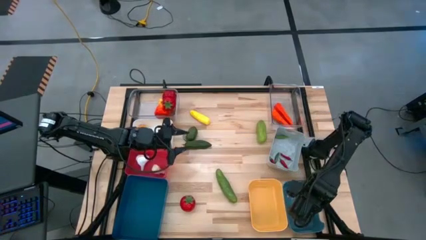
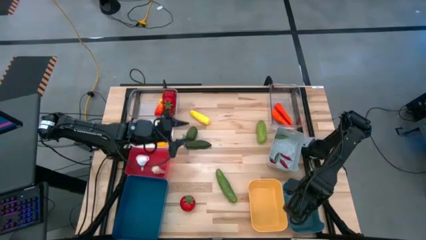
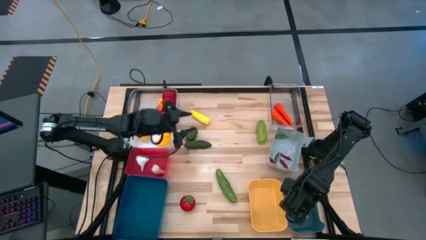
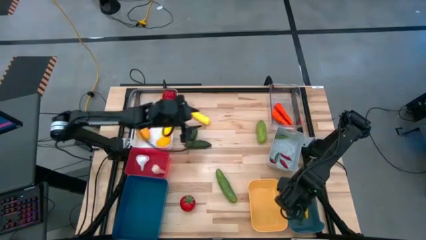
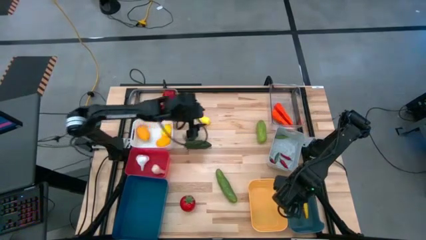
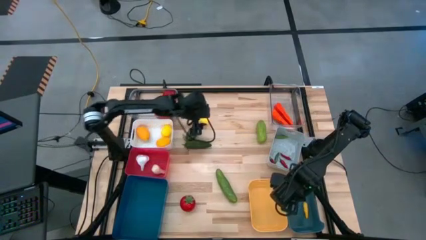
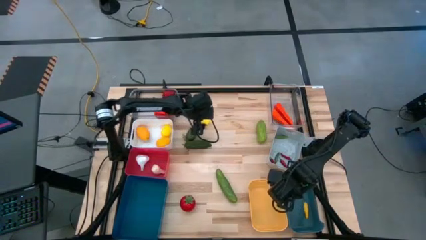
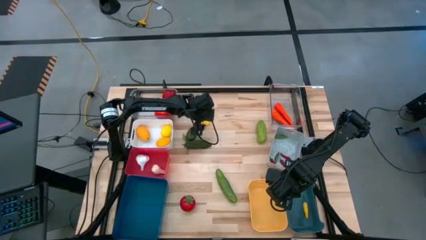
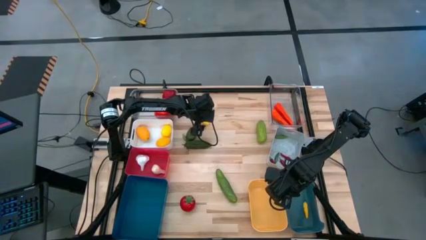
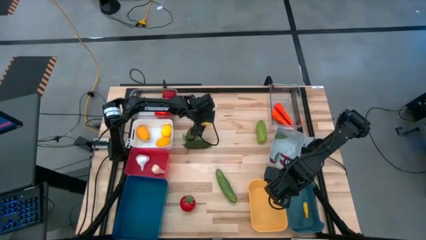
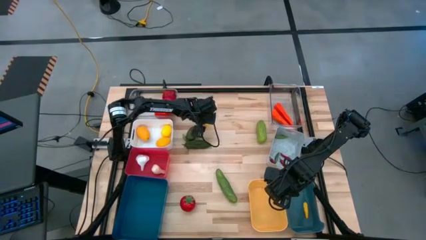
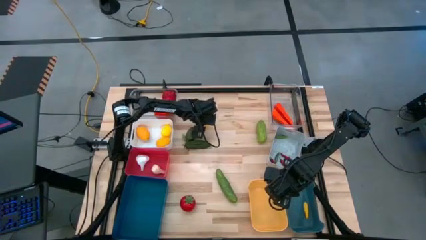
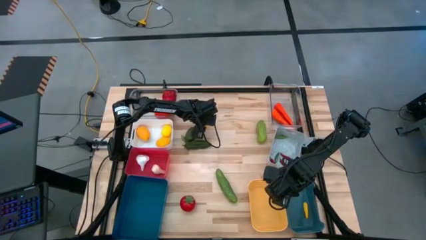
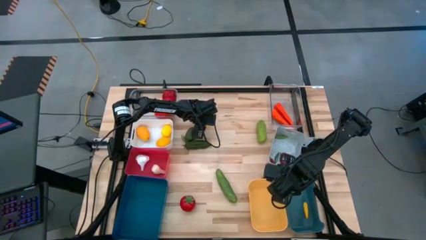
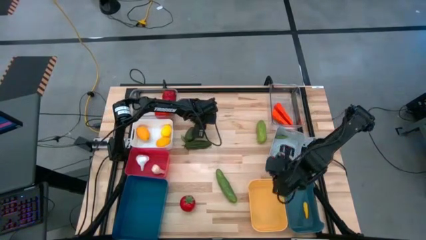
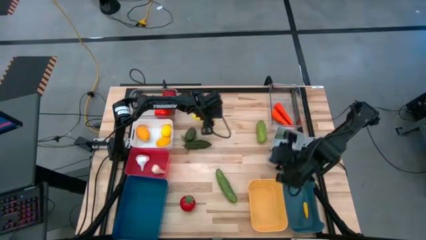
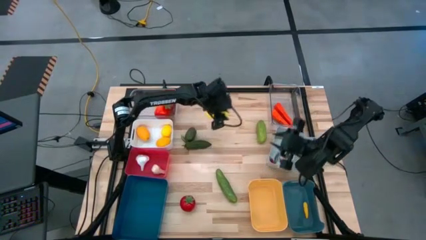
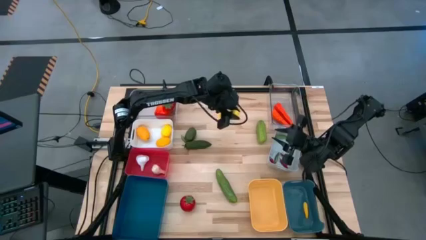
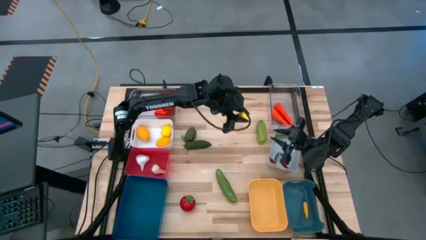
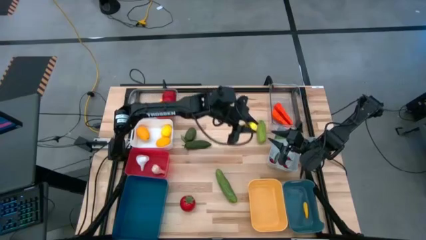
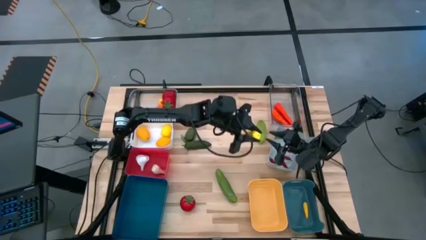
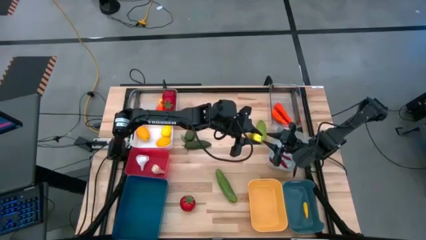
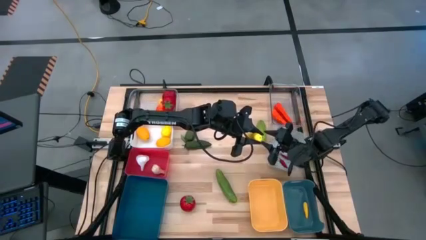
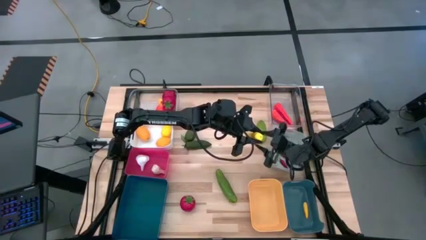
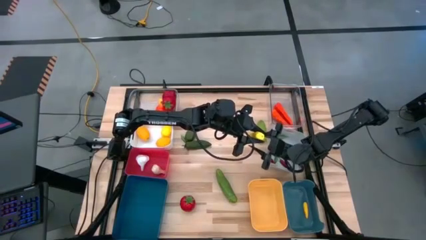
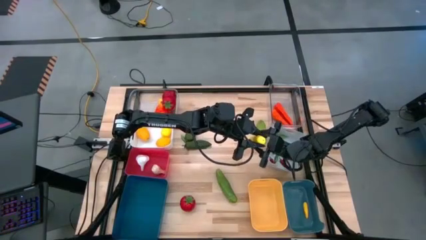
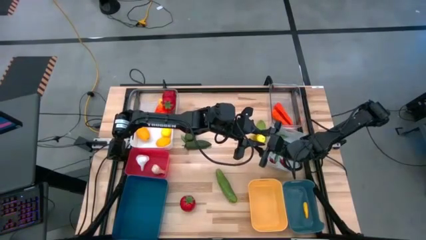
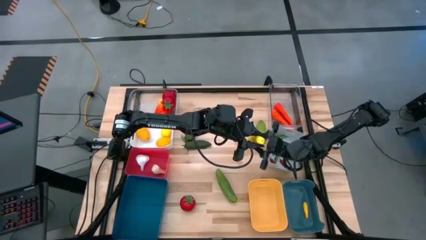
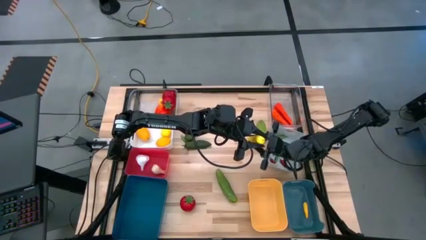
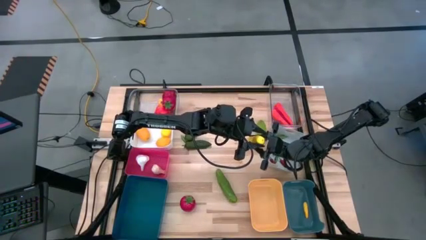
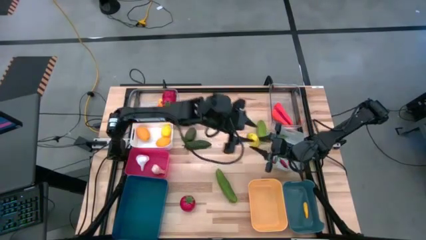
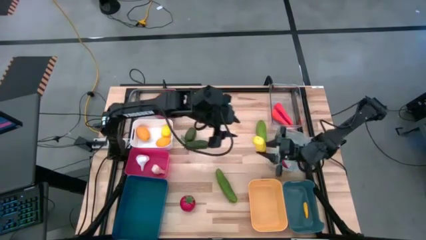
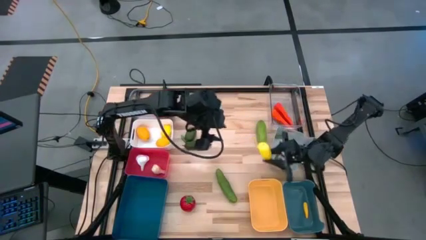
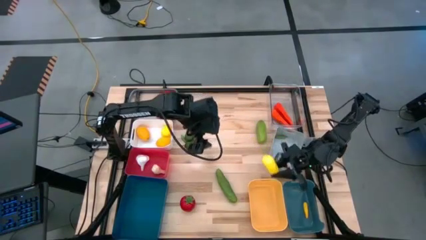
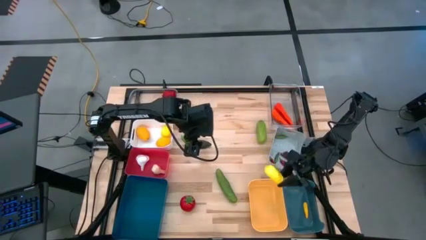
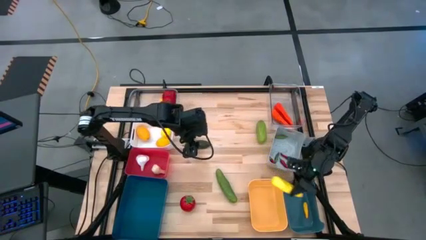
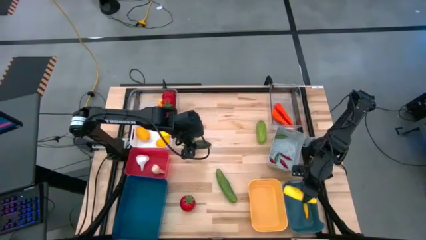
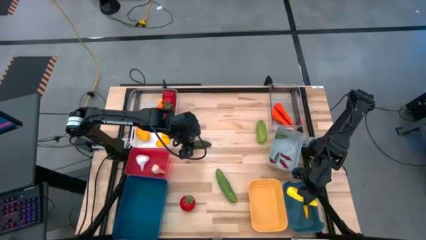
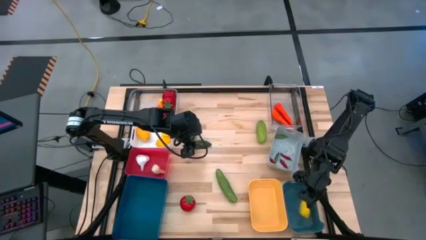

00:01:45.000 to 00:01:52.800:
Task: Sort produce into baskets
Put the large yellow corn into the right blue bin

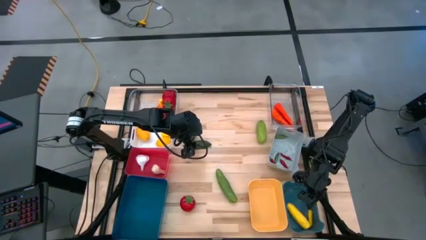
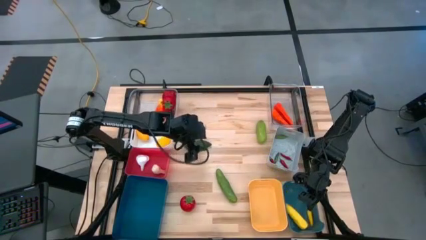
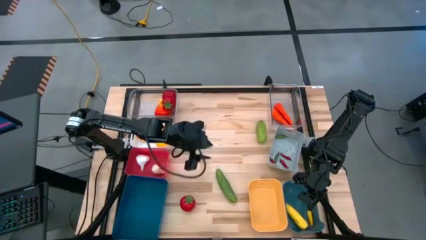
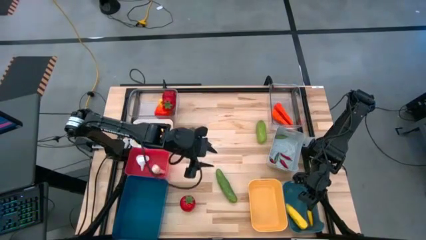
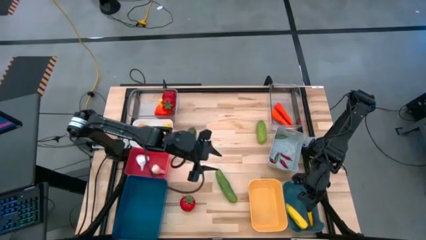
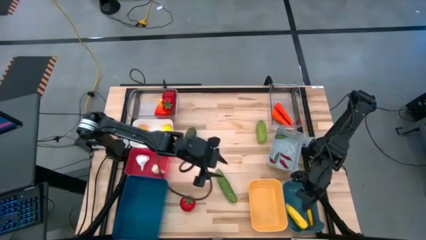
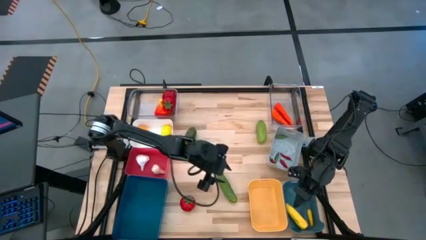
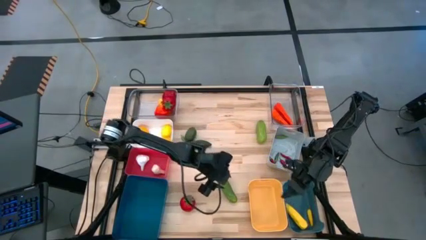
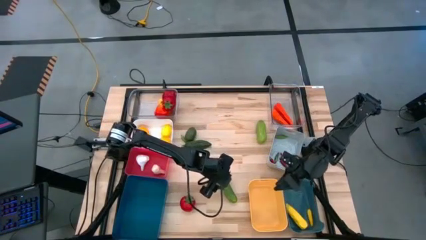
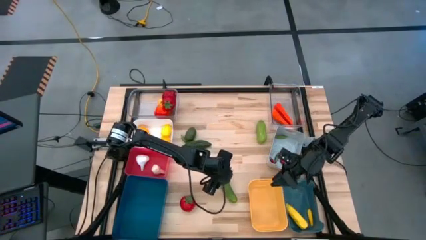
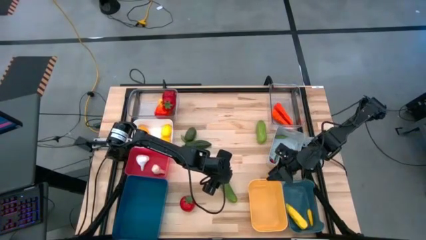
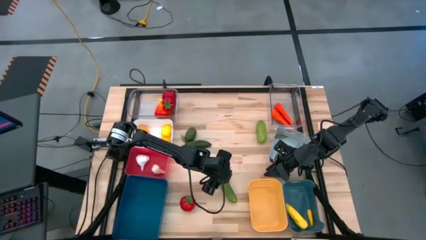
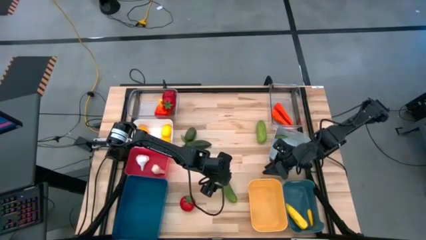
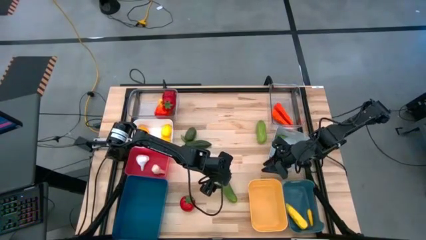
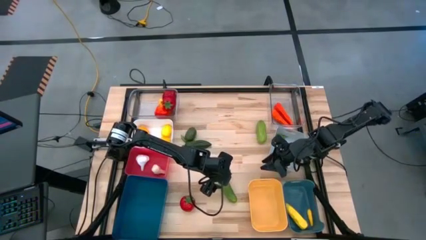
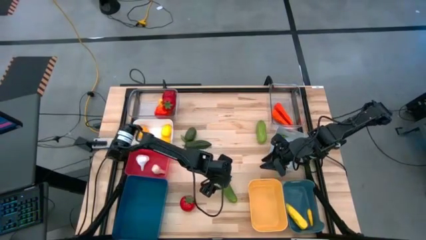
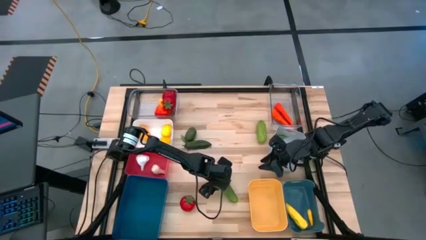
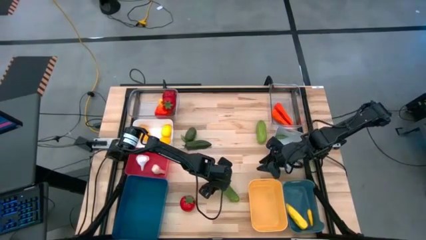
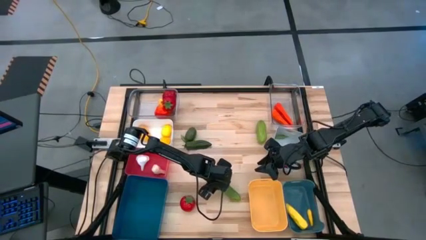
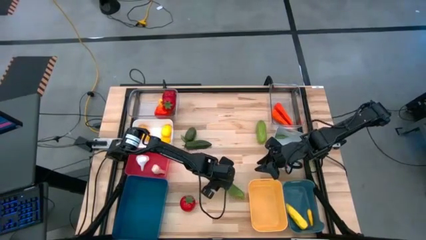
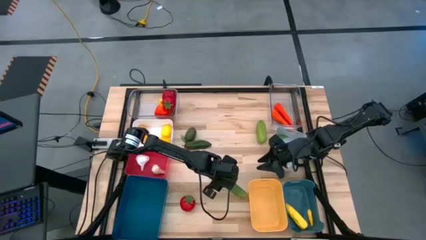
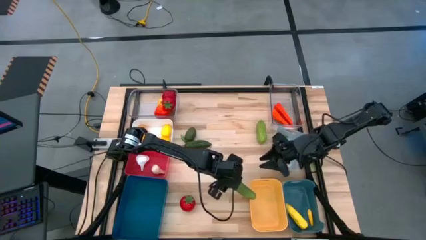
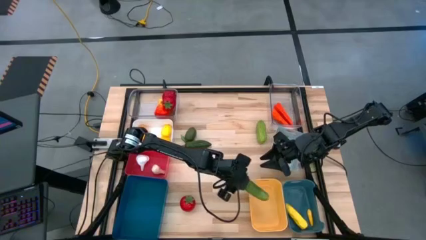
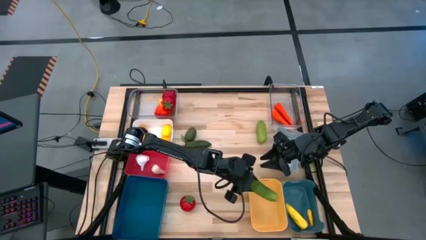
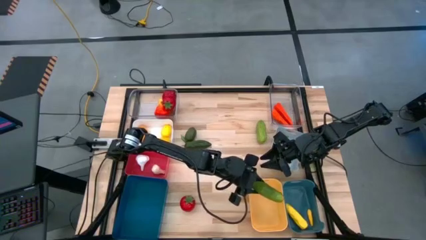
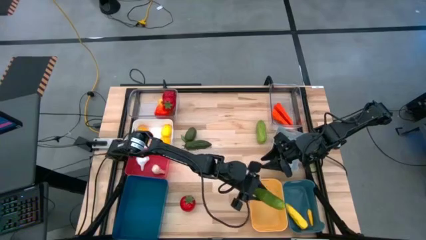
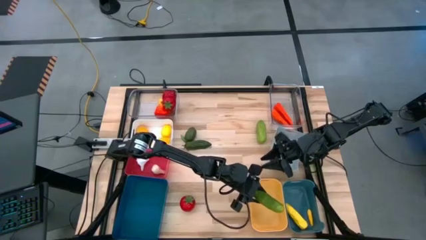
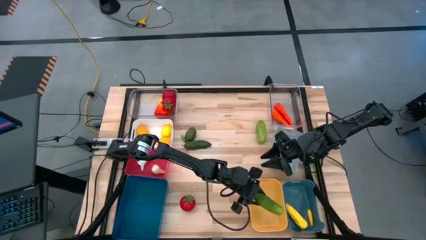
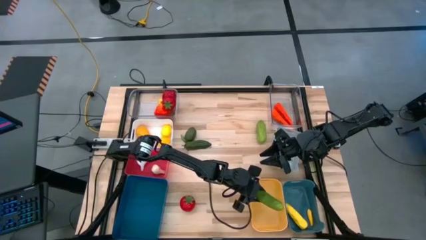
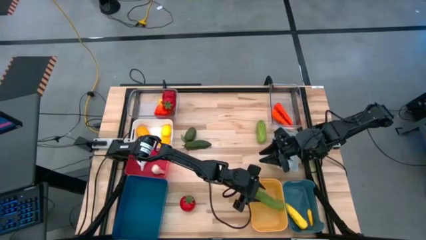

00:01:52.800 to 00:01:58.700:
Put the bottom green cucumber into the yellow bin

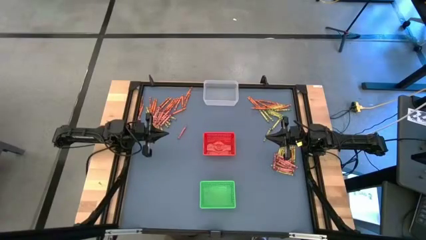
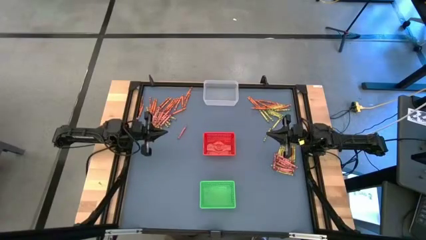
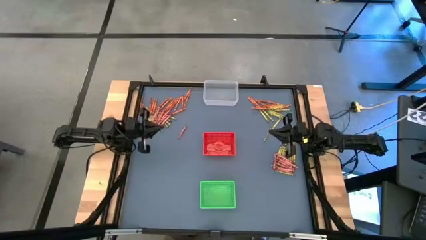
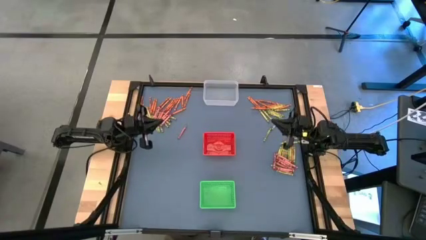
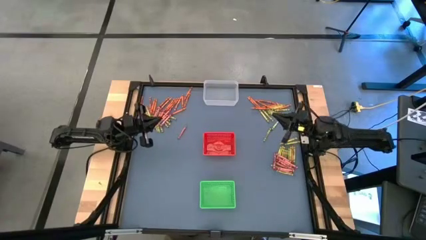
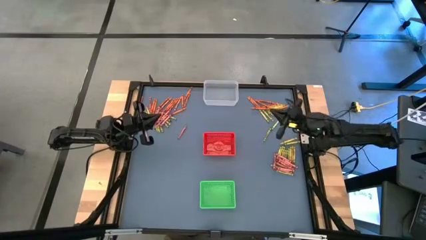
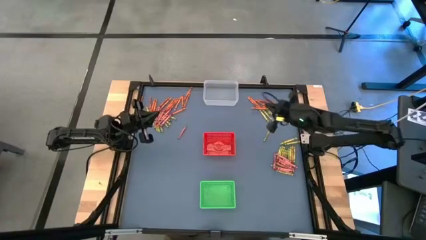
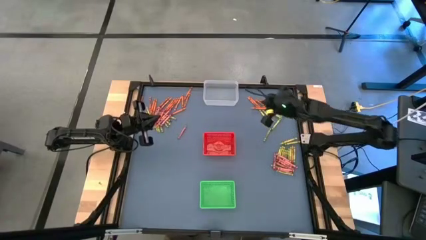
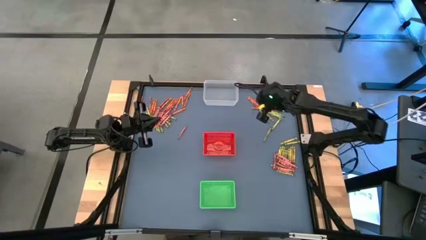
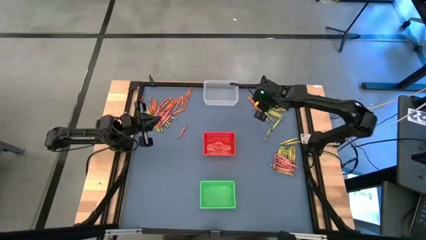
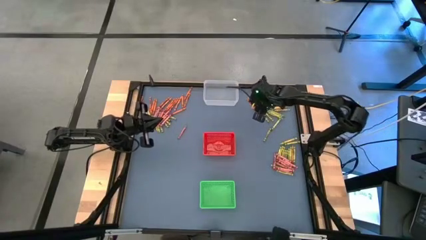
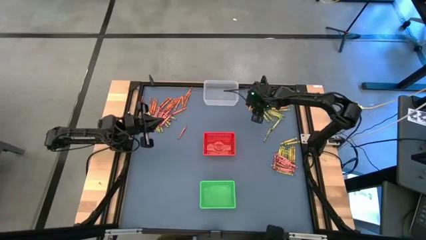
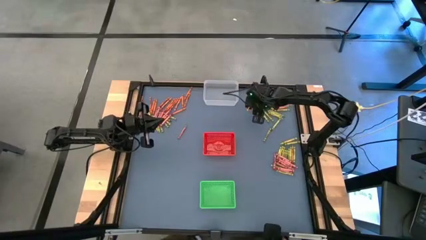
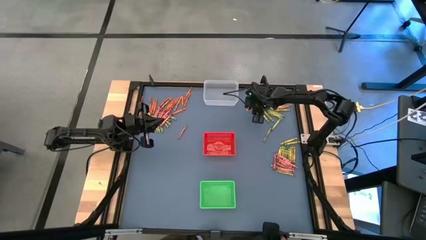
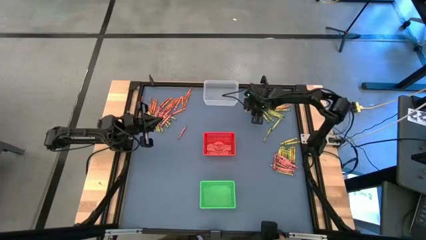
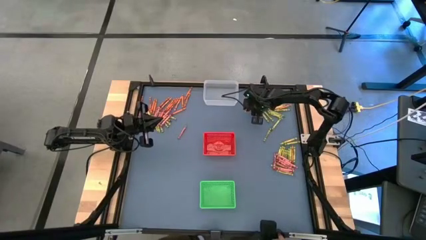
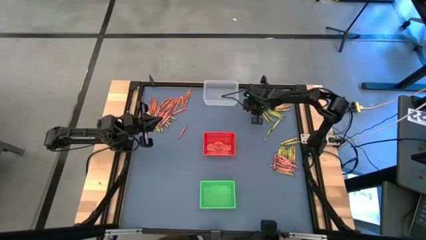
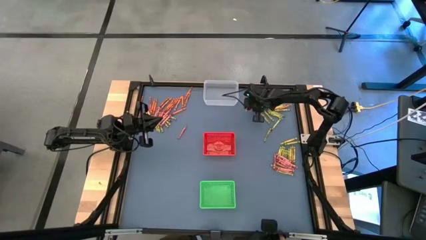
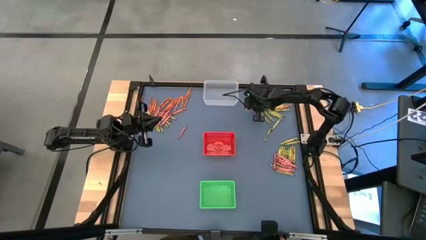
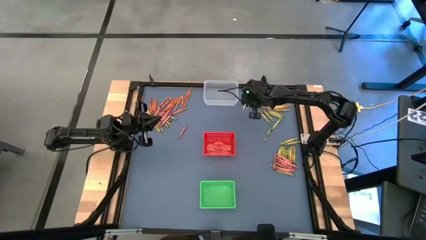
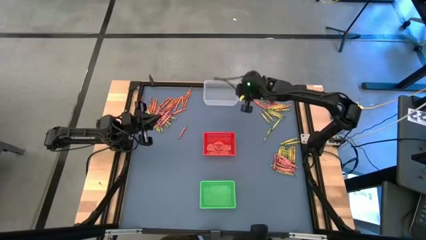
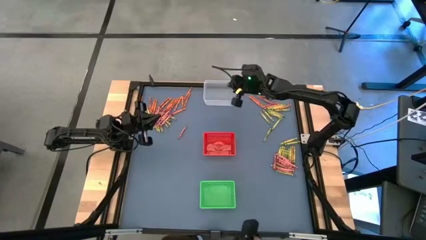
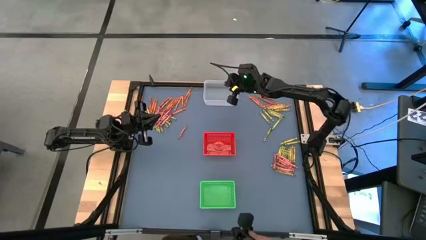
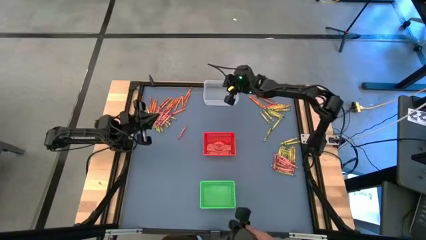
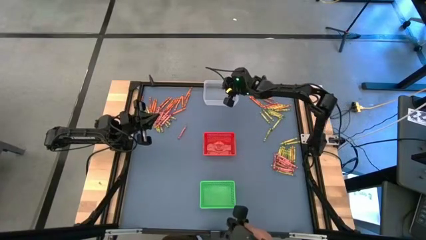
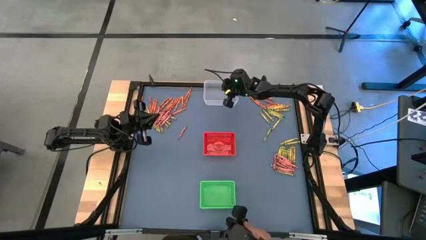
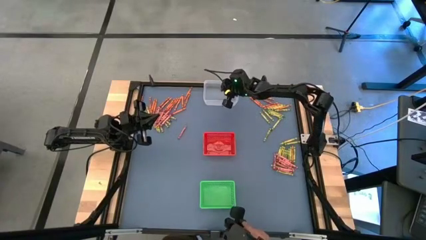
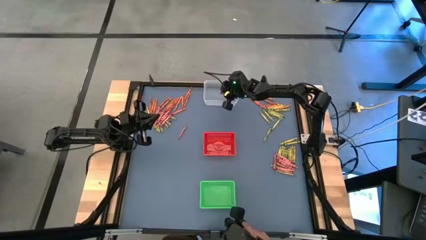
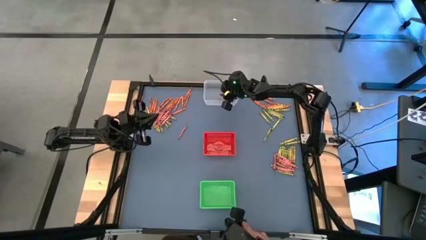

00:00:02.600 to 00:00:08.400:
Task: Sort crayons
Put the orange crayon into the transparent bin
